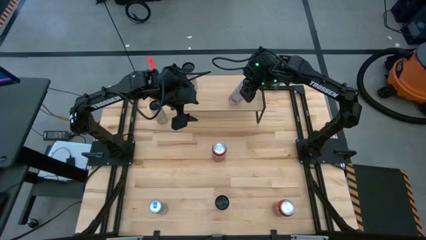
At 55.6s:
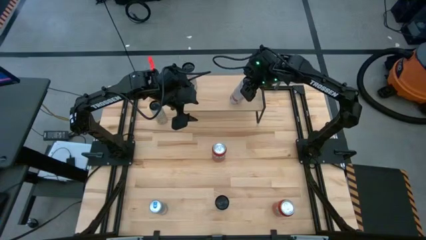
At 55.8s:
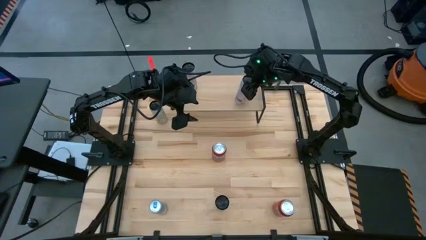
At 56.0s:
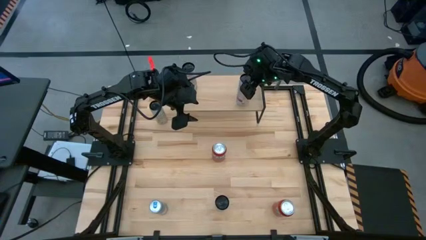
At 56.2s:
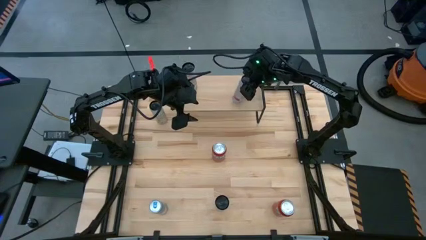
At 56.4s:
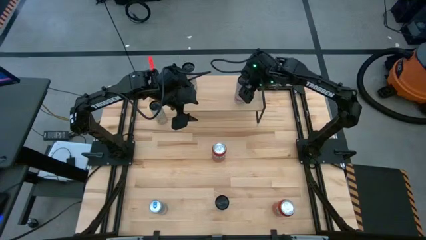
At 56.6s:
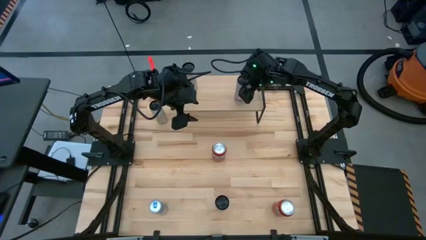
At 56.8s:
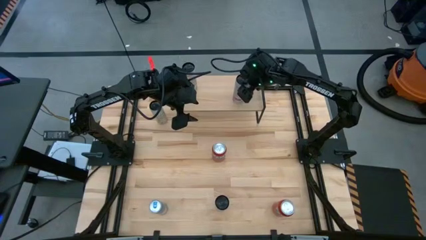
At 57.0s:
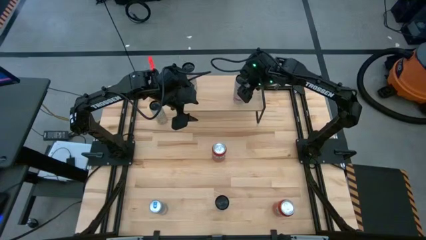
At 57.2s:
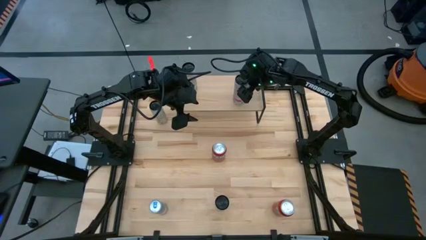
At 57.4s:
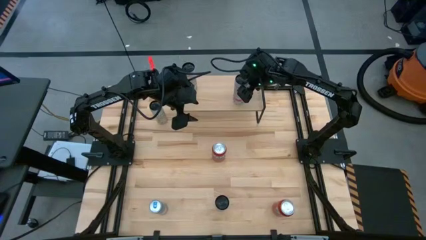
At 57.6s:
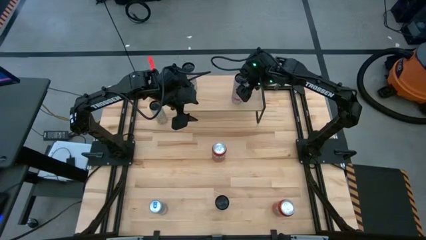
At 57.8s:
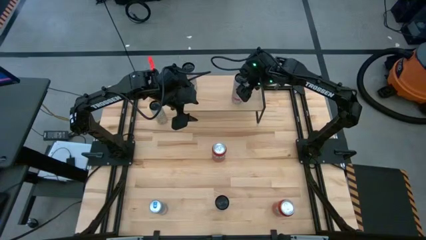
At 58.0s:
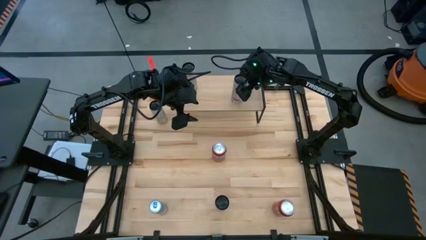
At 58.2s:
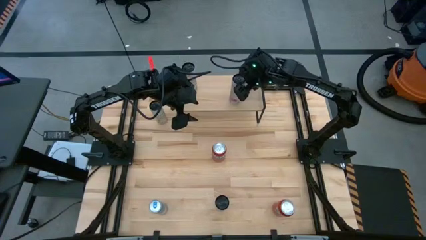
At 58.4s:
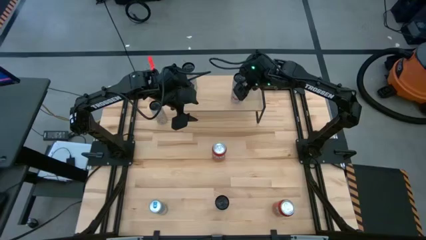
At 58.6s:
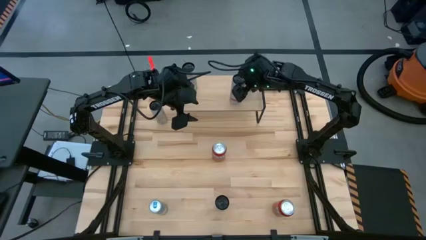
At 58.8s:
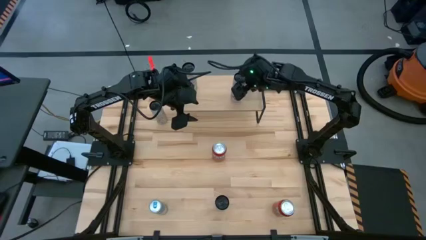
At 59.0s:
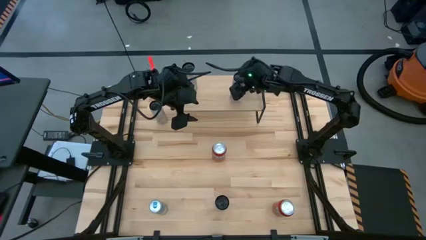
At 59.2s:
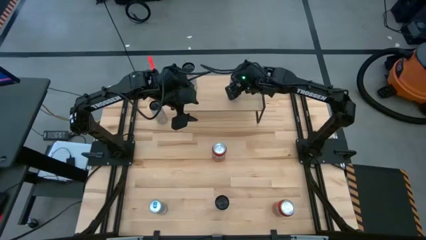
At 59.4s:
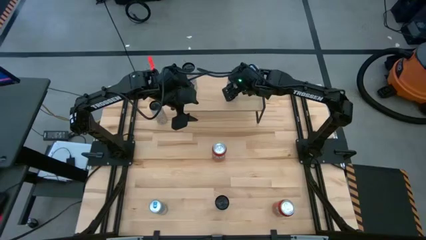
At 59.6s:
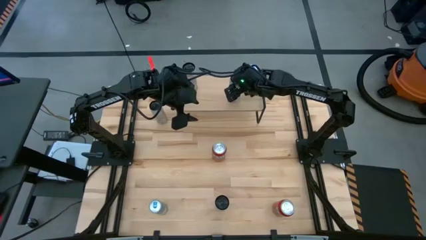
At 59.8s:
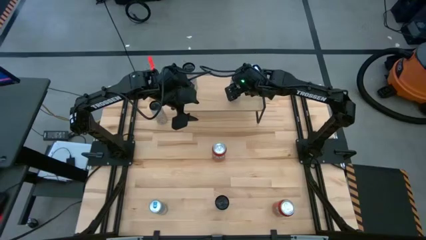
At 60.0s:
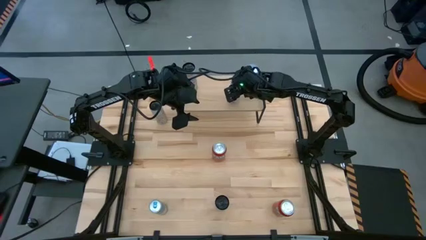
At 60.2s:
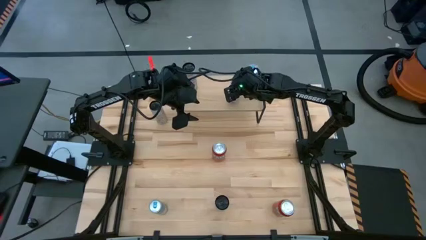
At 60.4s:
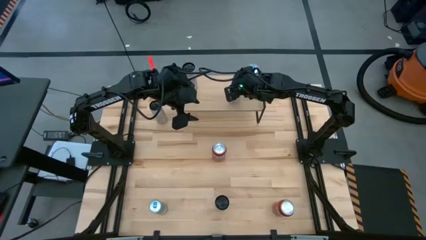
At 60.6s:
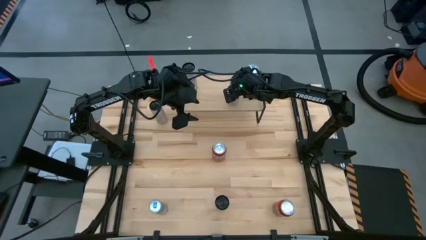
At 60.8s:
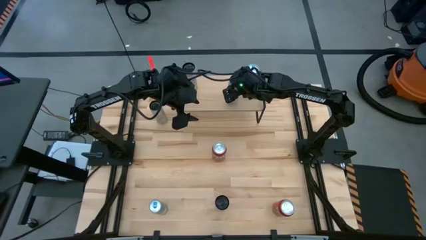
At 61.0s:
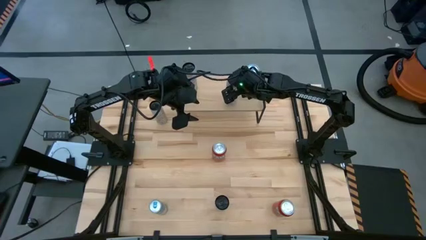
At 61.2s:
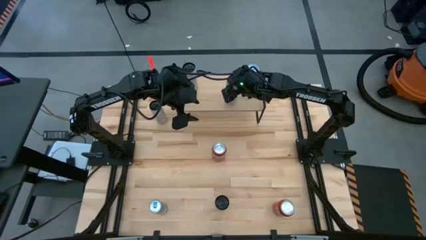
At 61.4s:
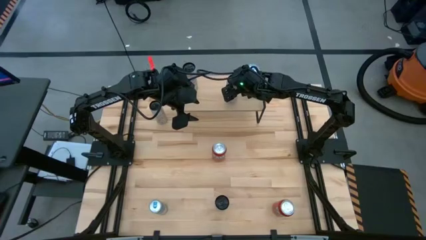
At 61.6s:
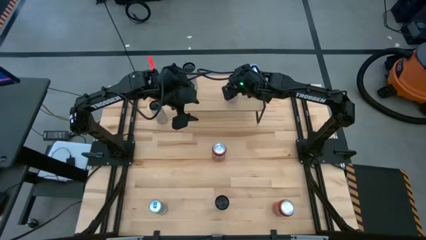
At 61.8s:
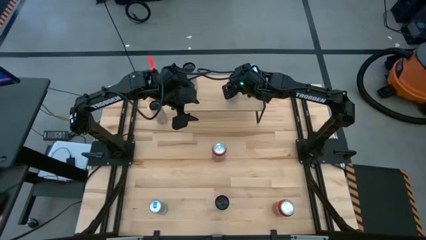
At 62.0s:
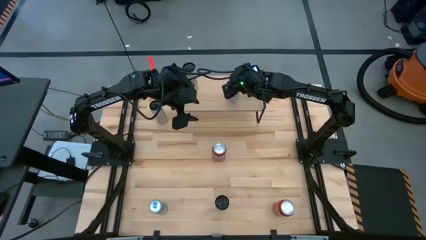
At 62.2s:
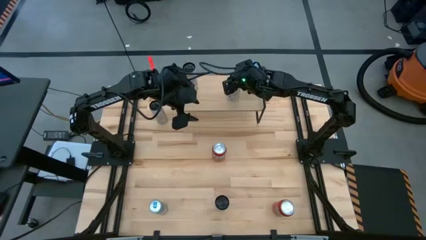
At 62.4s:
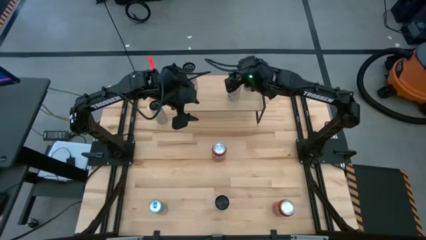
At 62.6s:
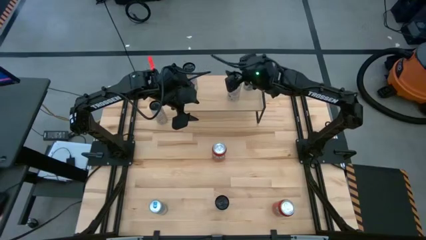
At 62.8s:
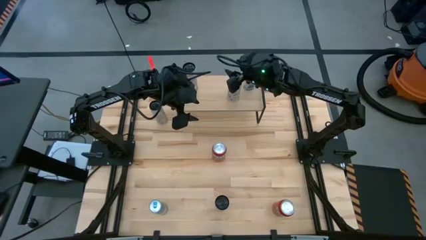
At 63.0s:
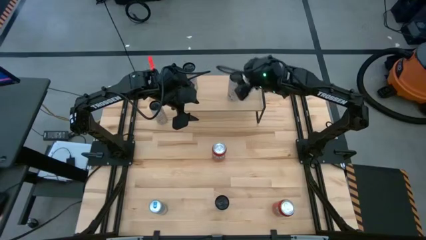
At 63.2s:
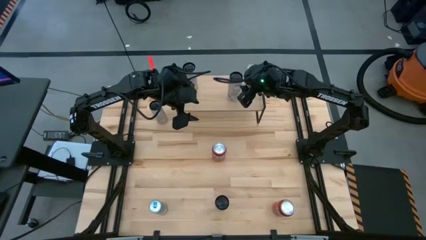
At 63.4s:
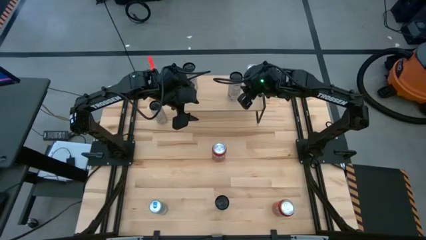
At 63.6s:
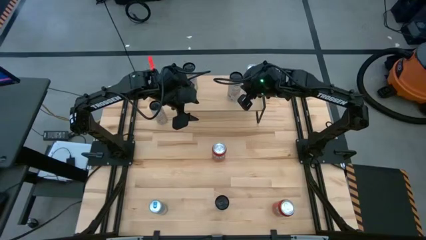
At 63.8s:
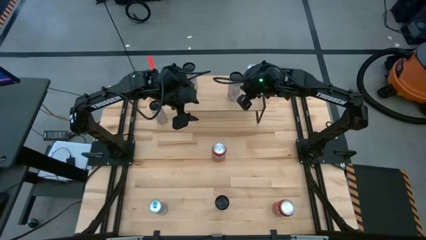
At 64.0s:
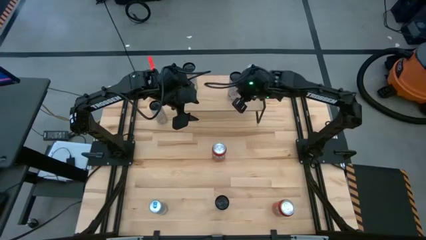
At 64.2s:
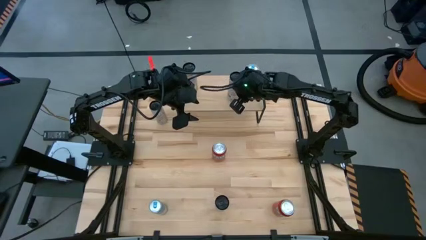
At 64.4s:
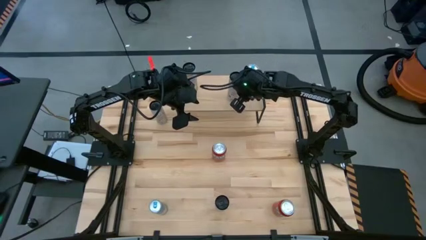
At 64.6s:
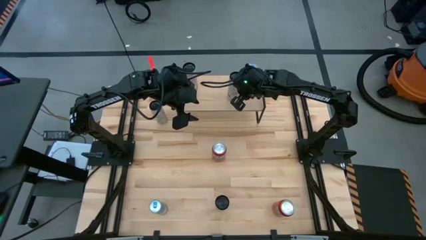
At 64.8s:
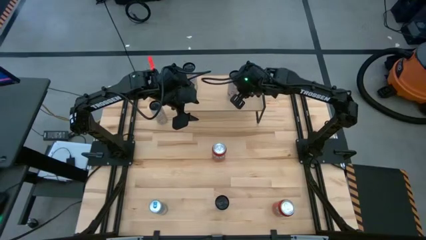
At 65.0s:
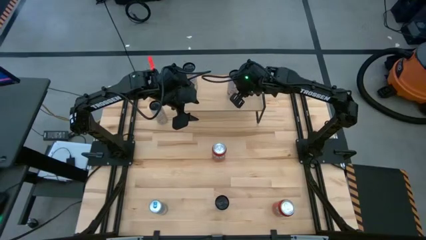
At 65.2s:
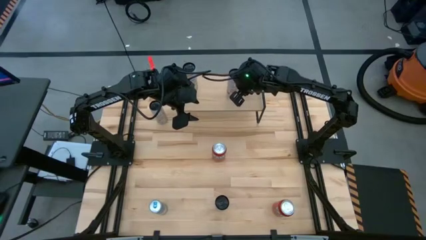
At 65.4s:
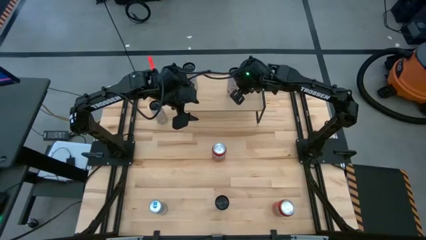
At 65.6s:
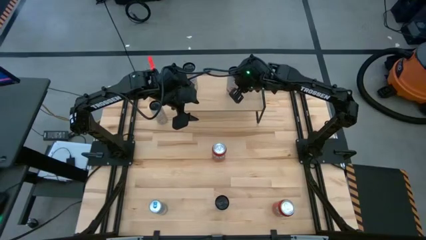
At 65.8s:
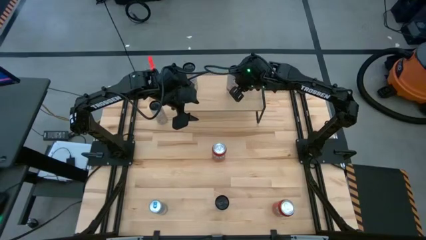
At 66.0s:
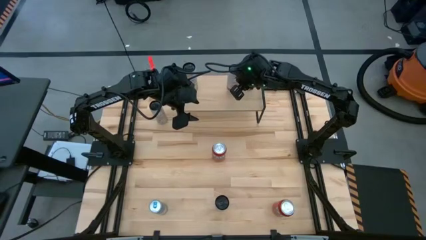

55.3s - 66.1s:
Task: Place canned beverage on shelf
Put the top white pink soda can on the shelf

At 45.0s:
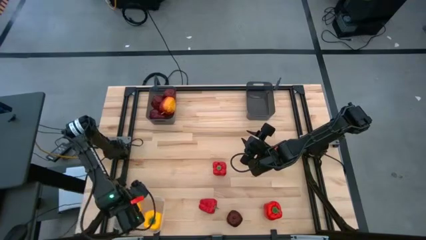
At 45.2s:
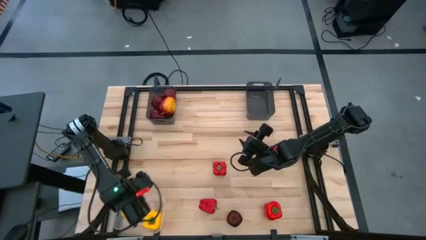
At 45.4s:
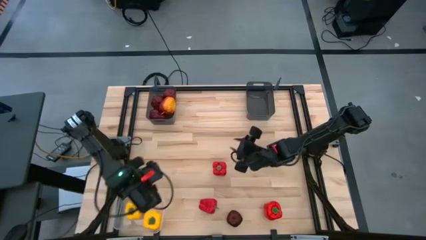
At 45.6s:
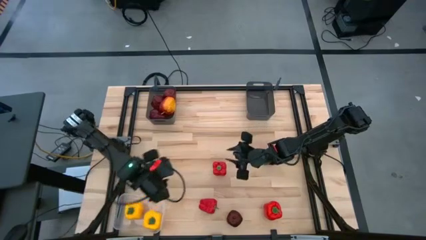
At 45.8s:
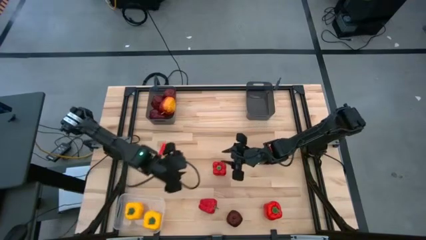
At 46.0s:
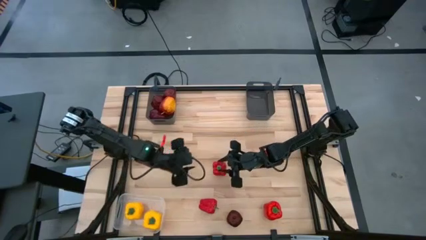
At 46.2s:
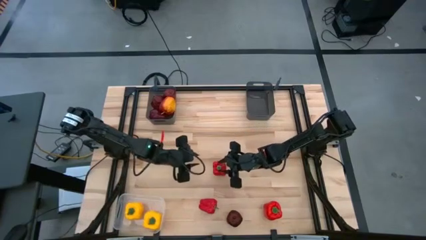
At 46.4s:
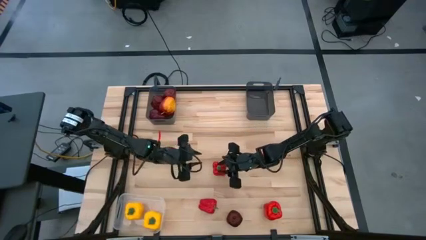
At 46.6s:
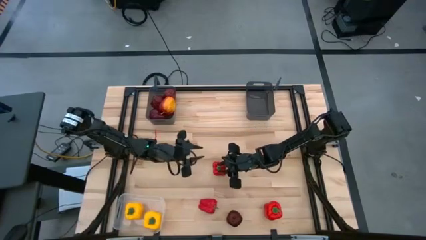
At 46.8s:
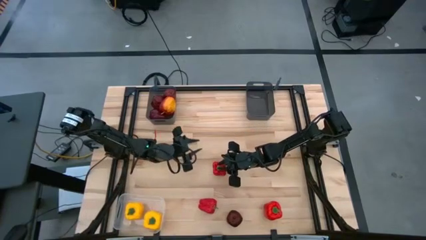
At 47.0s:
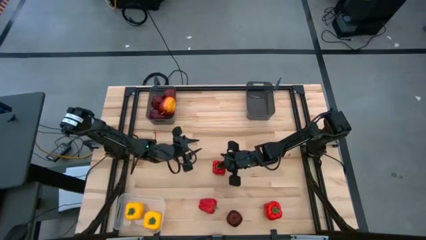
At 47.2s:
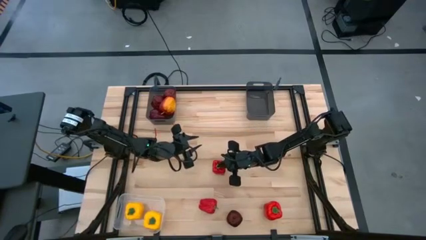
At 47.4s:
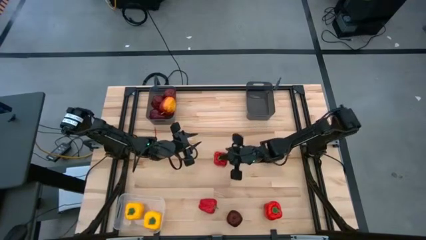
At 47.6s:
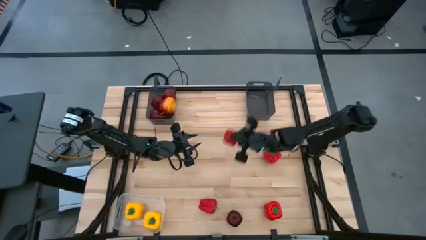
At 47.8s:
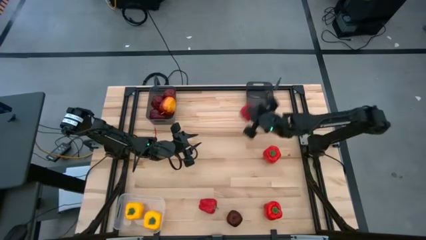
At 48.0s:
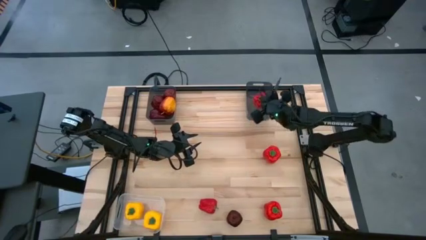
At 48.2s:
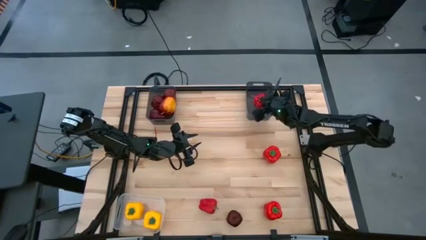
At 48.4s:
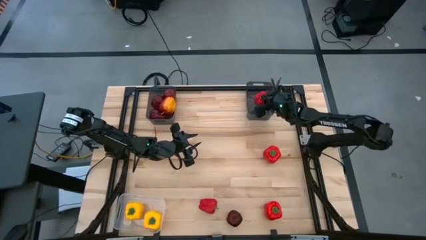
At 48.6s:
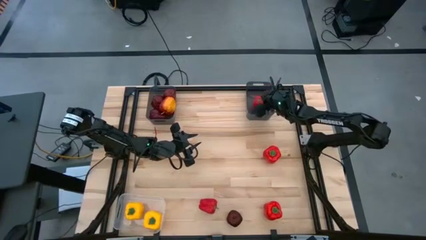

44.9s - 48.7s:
Task: Sort produce into baskets
Put the red bell pepper into the right black bin
